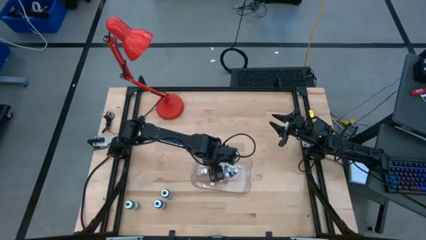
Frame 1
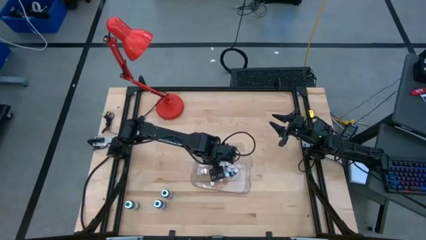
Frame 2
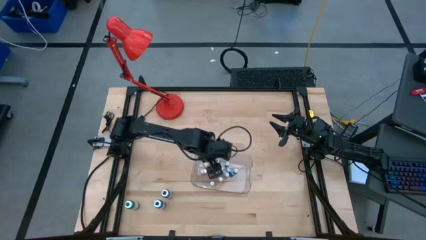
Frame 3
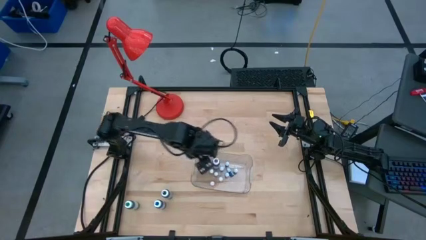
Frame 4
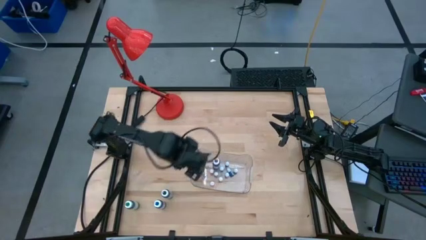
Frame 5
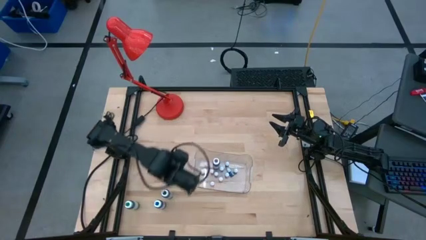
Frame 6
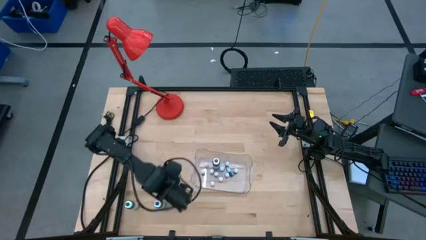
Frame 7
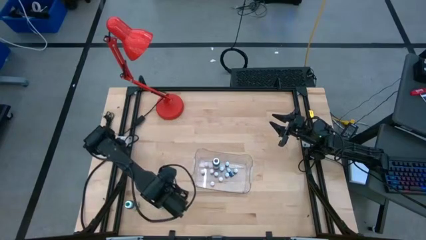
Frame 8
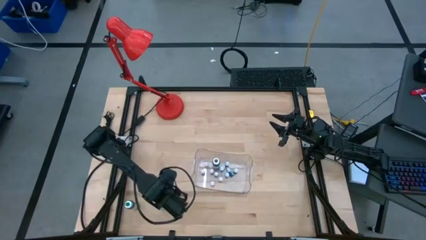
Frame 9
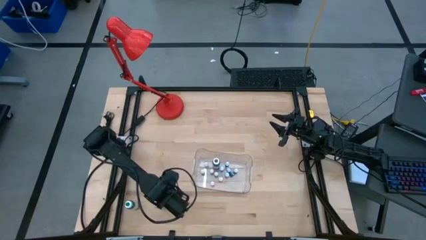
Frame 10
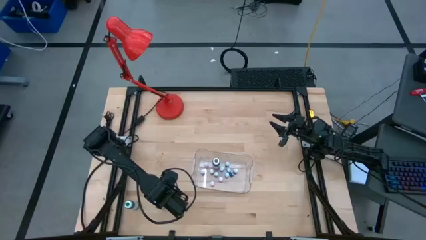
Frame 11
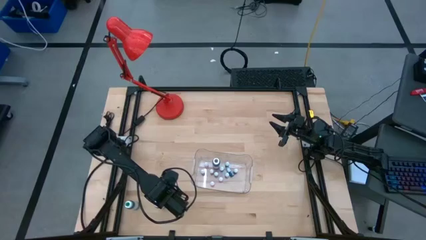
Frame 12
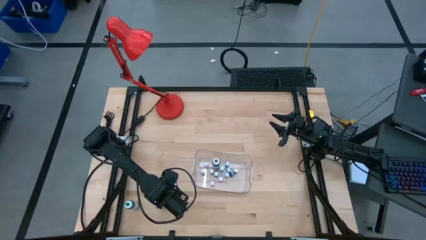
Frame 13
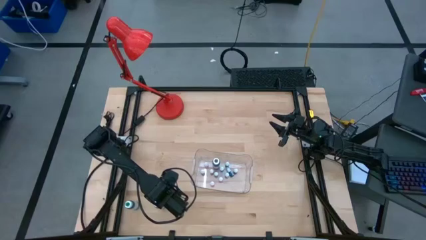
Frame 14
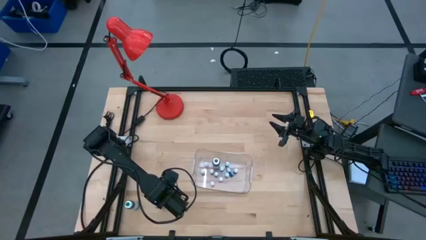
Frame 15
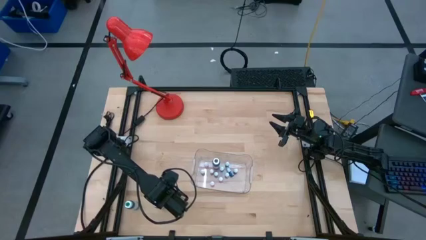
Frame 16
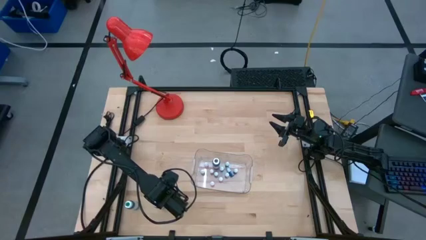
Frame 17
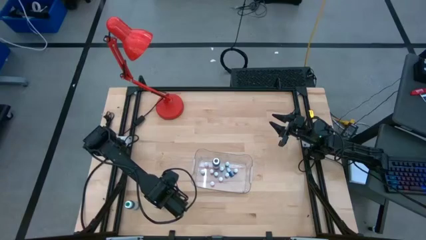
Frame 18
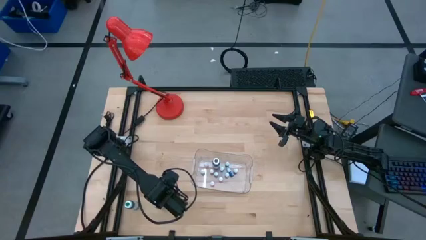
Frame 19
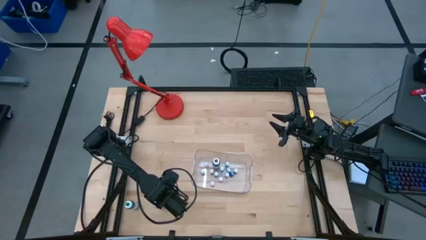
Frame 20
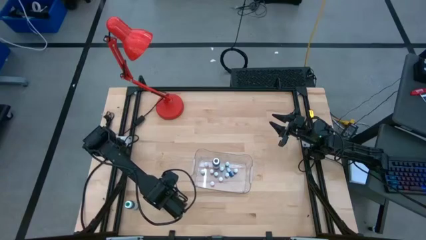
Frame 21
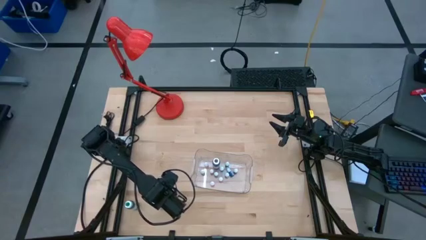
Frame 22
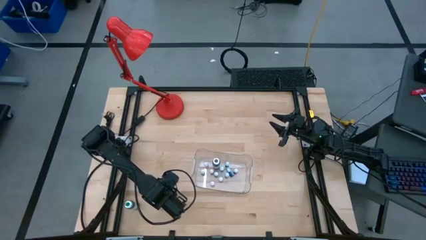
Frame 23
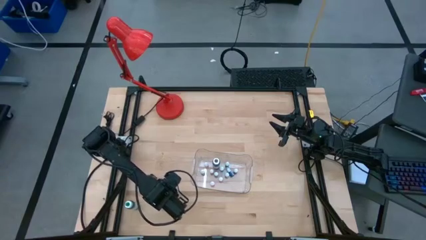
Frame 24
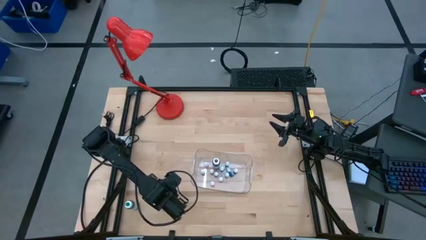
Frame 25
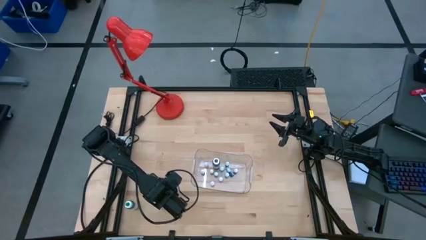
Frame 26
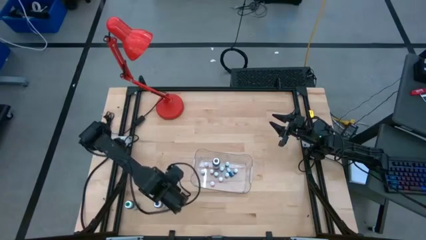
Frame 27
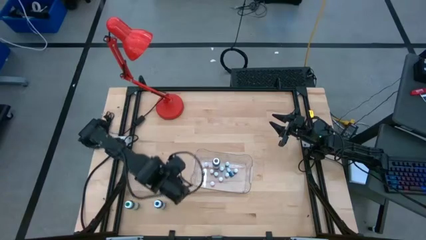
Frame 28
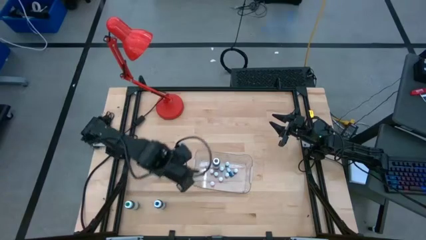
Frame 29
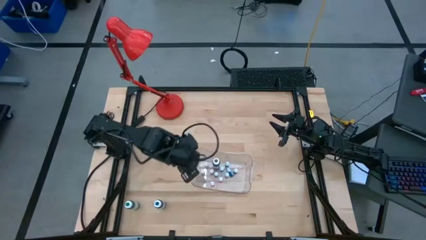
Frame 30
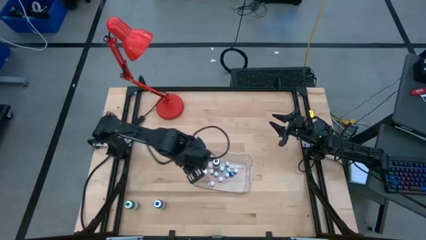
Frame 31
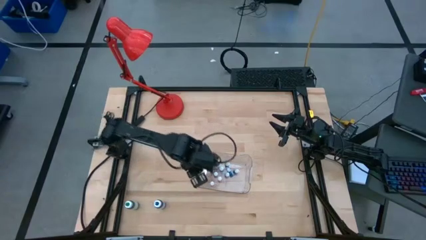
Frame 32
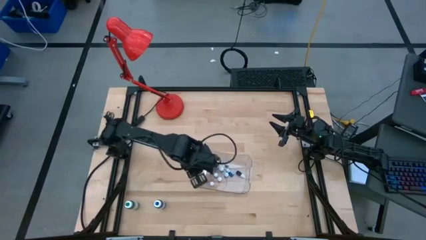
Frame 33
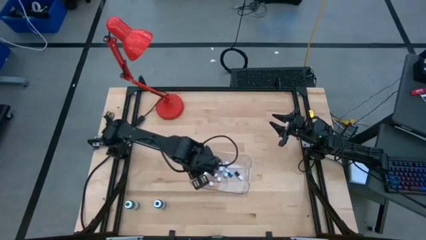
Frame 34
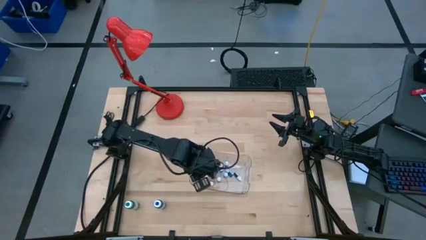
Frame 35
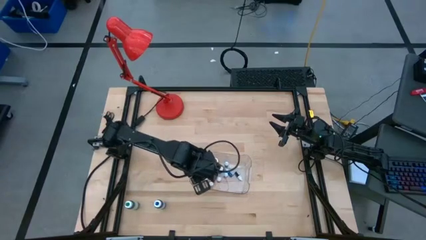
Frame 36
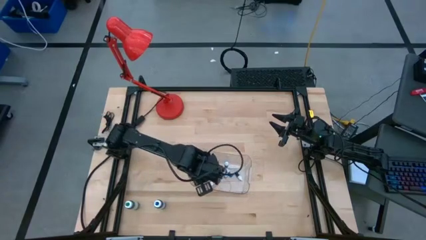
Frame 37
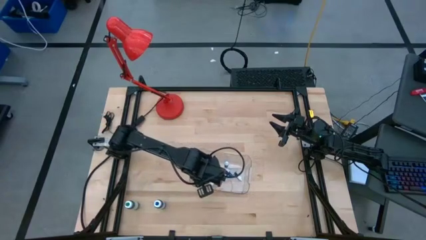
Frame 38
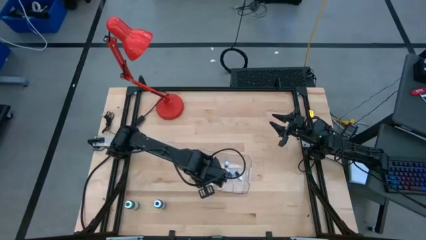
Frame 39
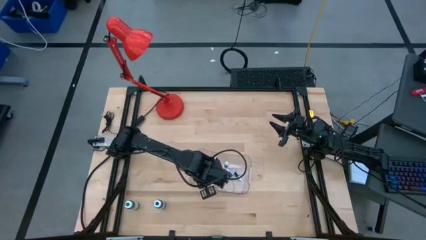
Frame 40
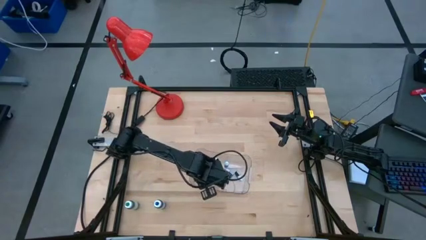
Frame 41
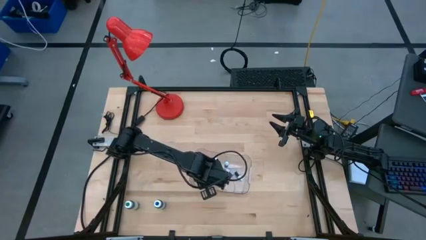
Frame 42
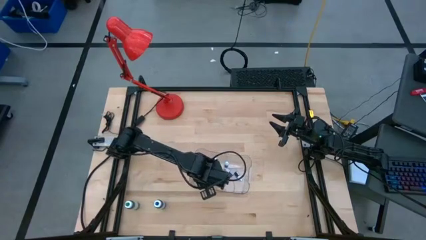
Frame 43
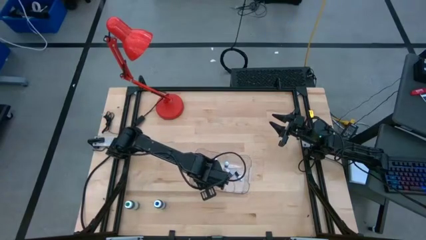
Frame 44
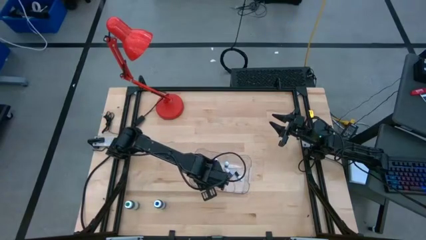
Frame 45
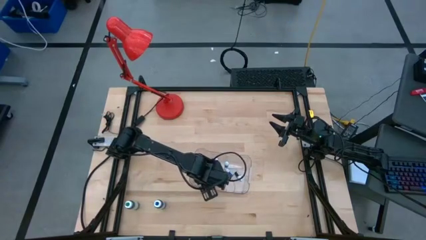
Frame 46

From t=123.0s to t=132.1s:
Task: Pick & Place food coloring
Put the large black food coloring bottle into the transparent bin

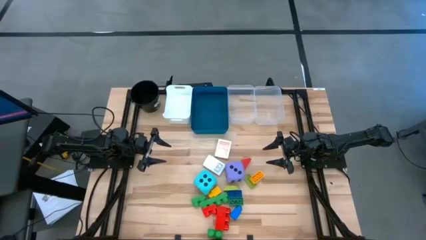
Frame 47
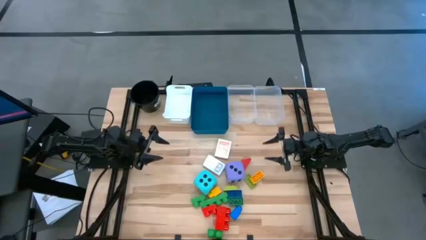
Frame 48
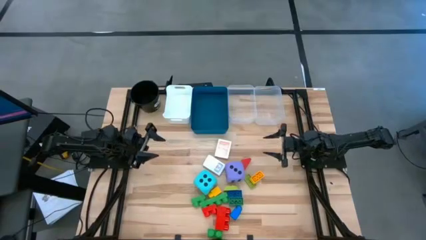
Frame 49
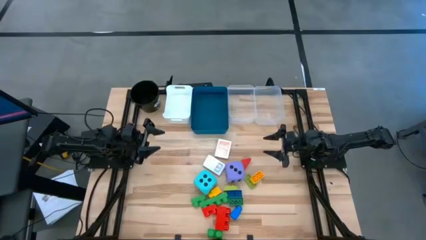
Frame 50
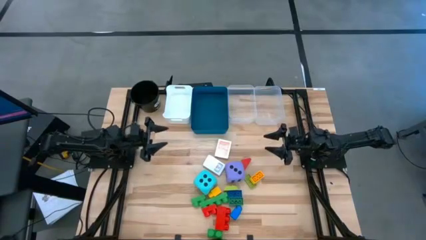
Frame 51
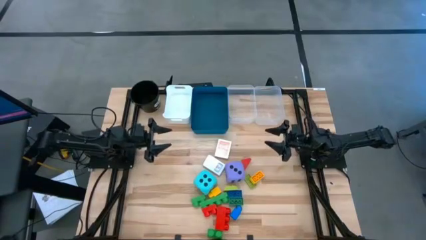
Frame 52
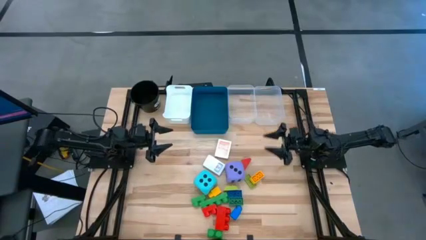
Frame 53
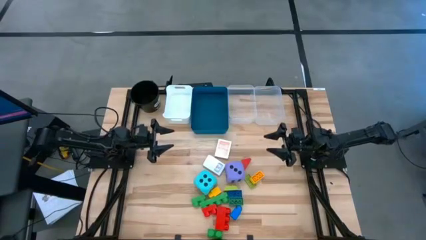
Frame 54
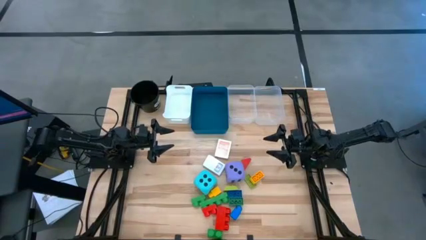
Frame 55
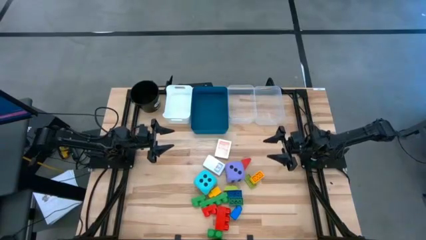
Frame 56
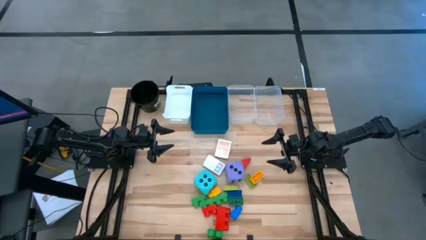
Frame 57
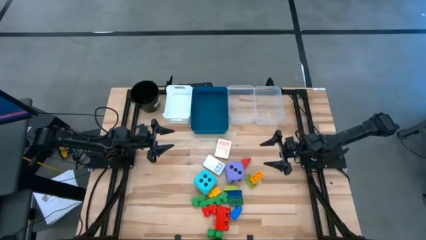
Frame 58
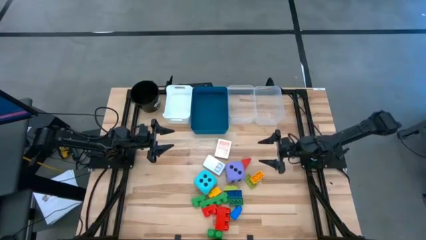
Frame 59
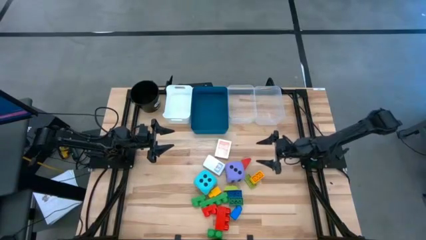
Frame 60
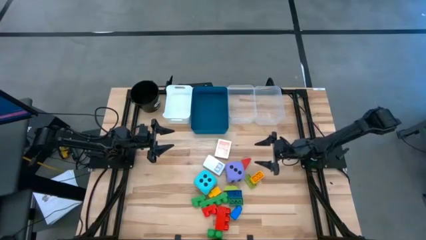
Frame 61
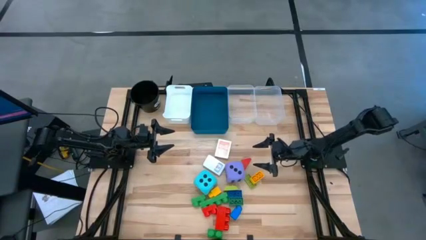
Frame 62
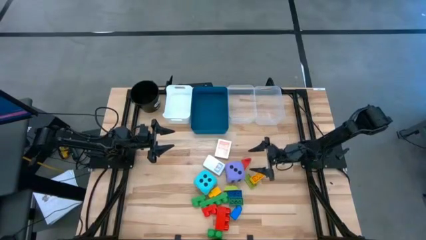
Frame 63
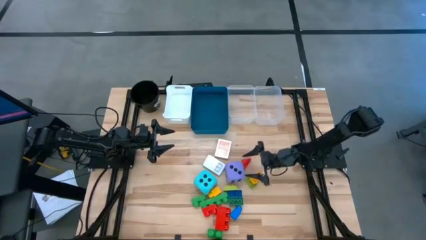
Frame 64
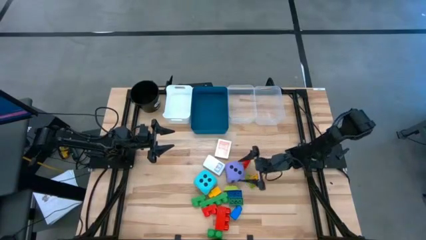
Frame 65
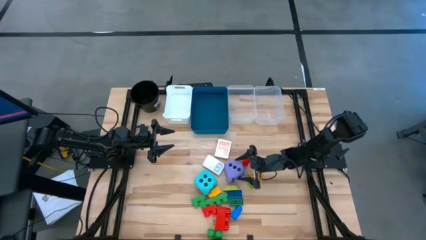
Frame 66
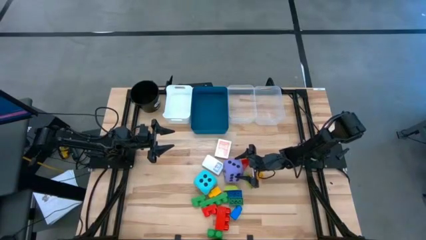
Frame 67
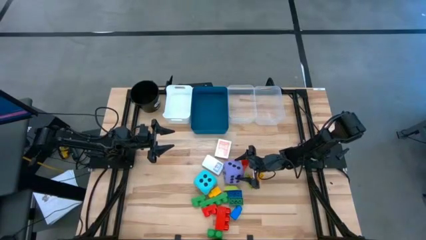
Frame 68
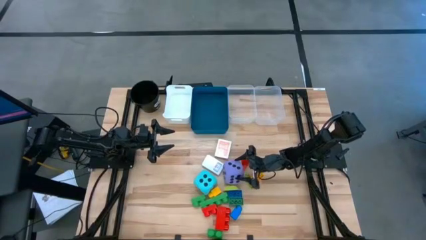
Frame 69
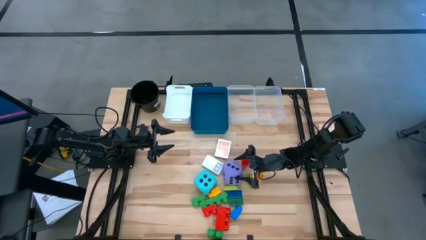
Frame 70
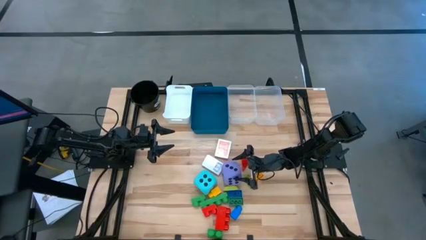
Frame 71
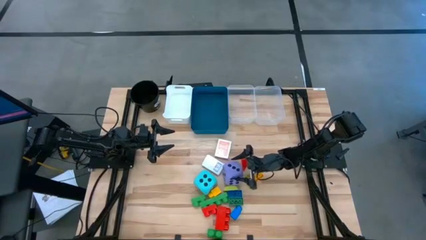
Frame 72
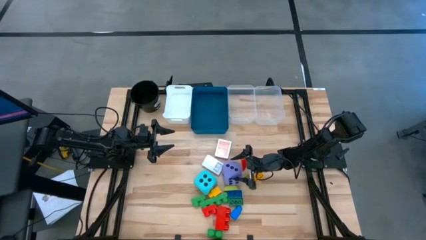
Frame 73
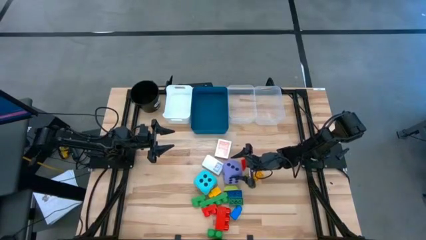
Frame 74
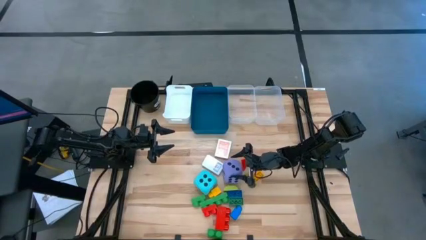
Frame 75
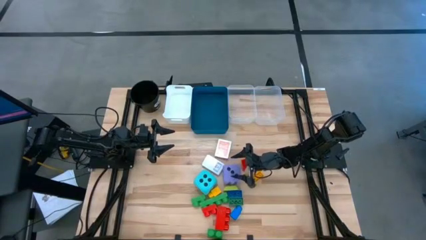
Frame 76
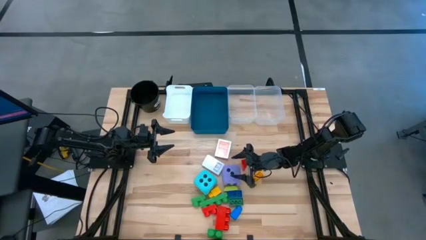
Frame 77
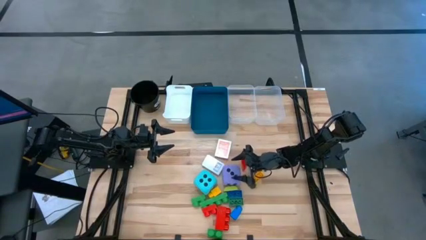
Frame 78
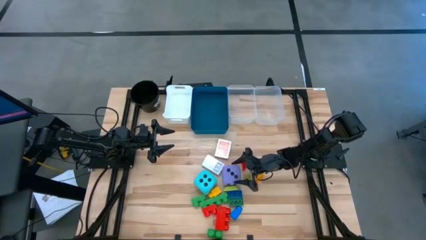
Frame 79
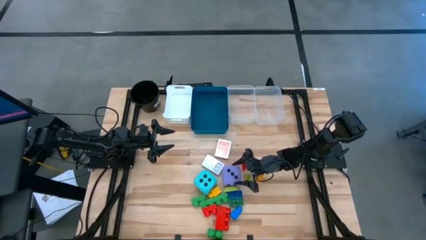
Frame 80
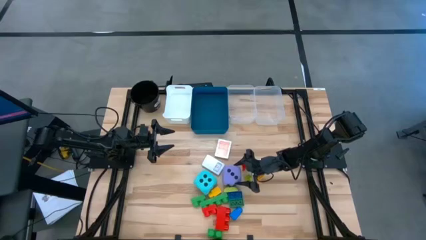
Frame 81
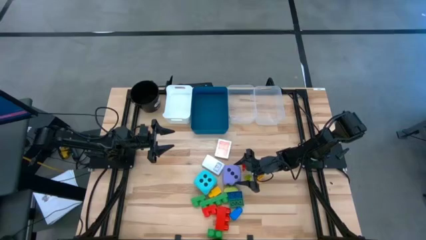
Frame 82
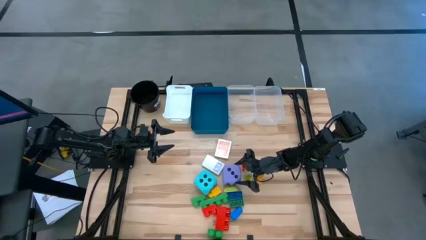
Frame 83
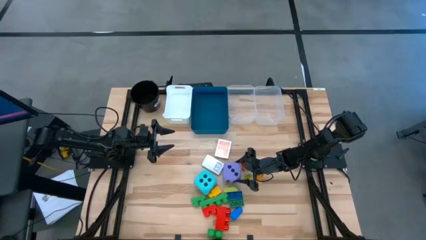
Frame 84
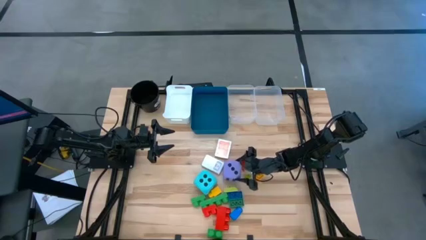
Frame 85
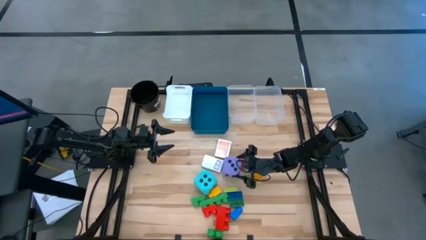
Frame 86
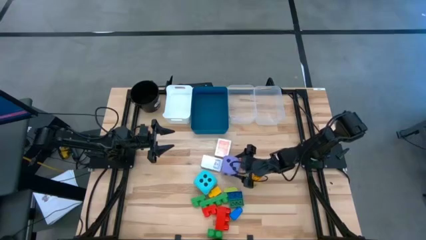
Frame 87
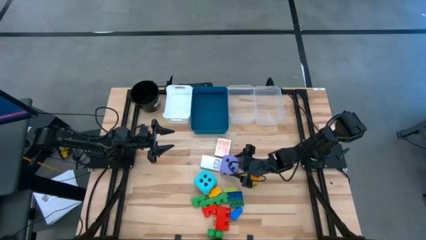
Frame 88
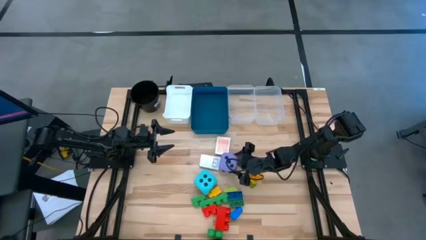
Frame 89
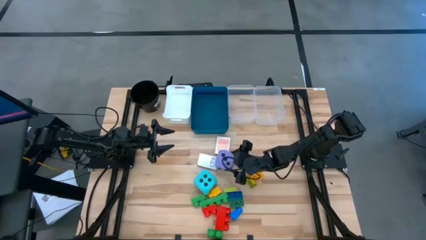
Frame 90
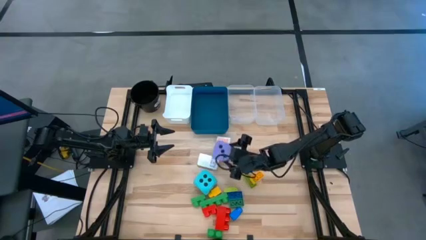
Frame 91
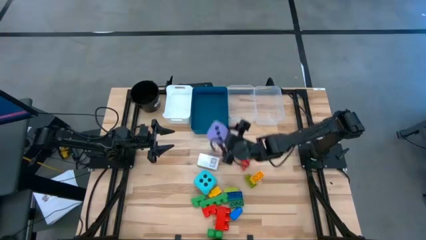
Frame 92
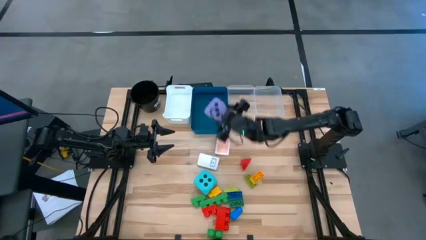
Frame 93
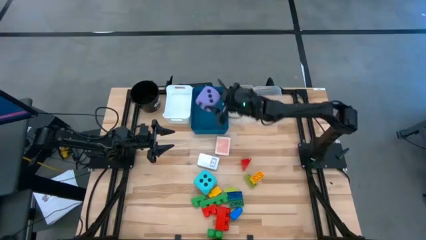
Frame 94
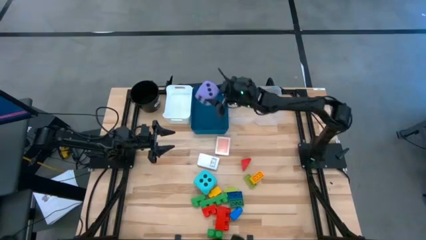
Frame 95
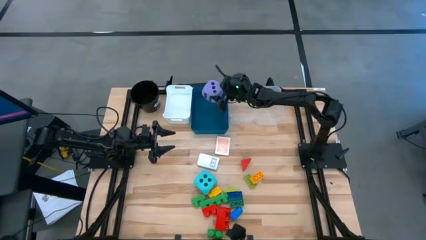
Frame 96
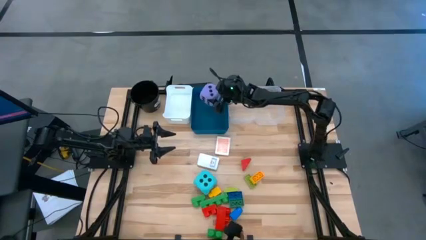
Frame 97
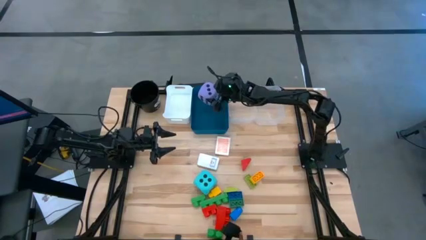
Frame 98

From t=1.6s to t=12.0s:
Task: Pick & Place Toys
Put the violet dice into the blue bin
